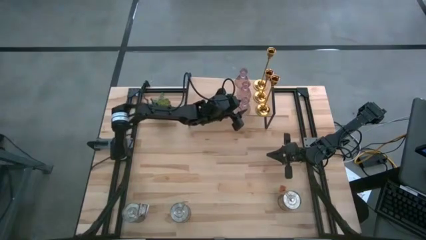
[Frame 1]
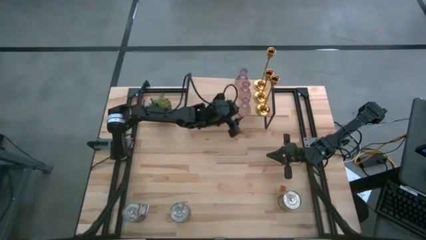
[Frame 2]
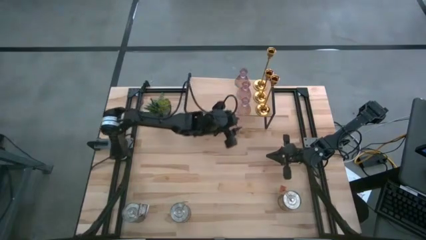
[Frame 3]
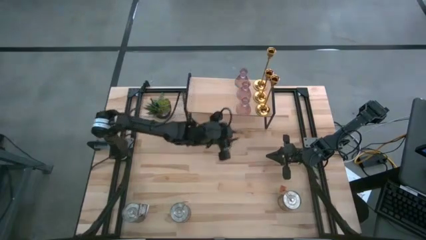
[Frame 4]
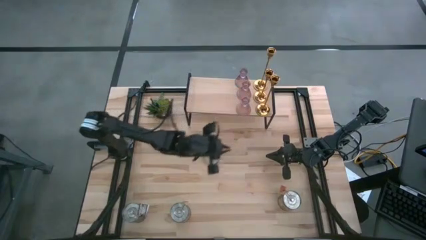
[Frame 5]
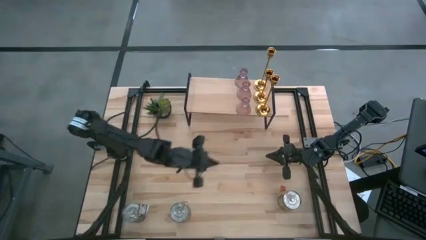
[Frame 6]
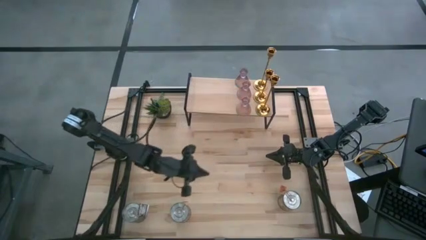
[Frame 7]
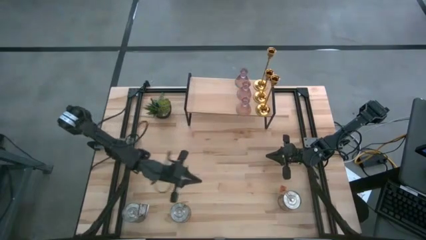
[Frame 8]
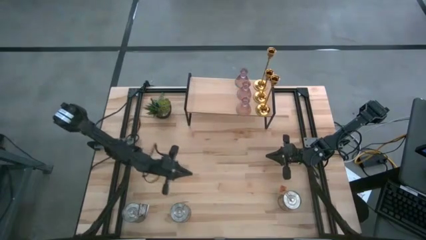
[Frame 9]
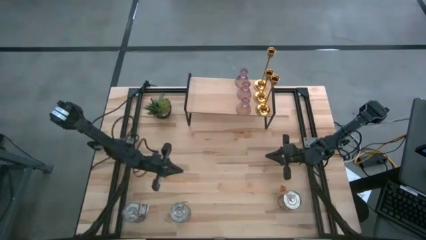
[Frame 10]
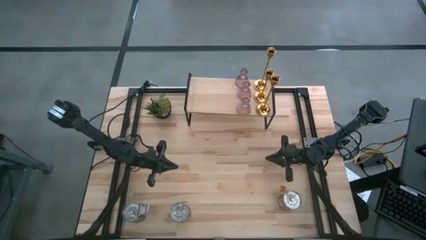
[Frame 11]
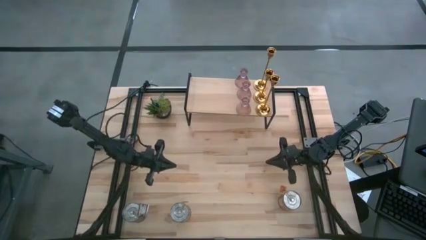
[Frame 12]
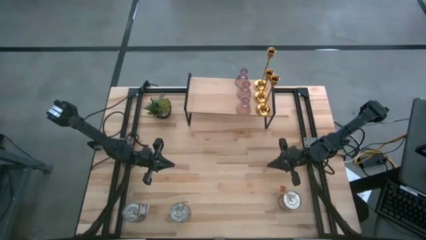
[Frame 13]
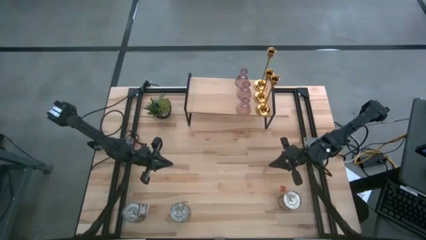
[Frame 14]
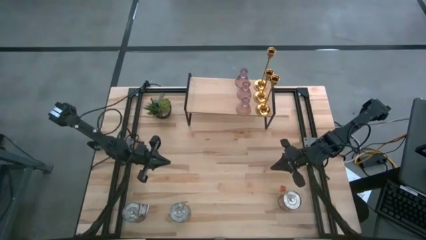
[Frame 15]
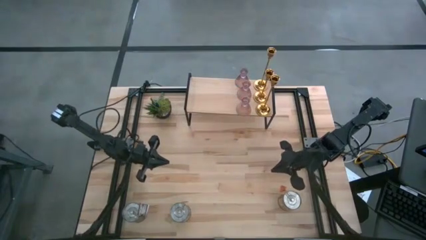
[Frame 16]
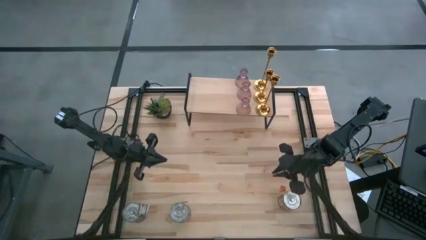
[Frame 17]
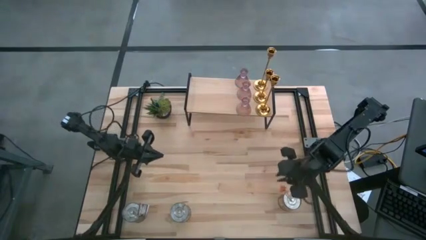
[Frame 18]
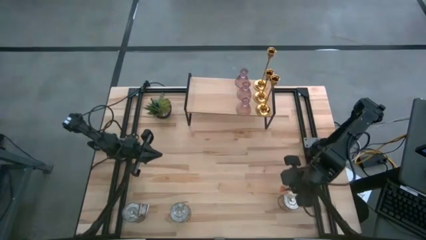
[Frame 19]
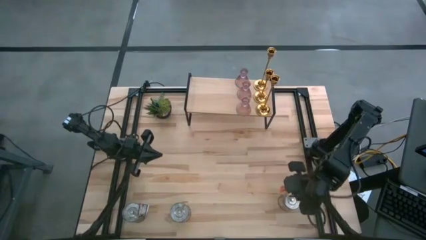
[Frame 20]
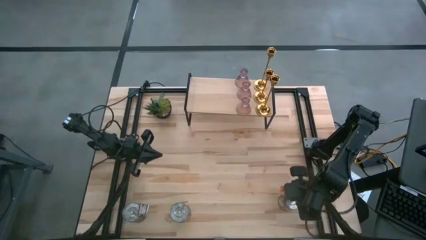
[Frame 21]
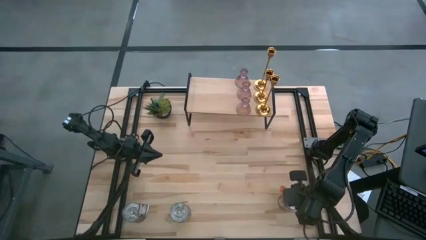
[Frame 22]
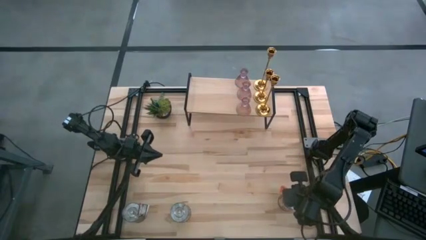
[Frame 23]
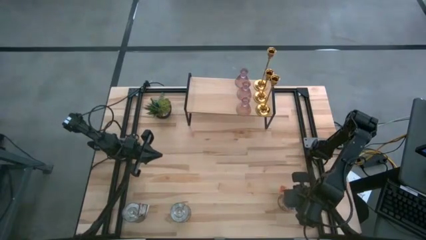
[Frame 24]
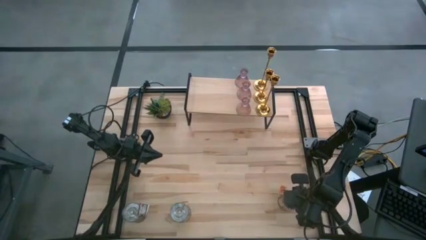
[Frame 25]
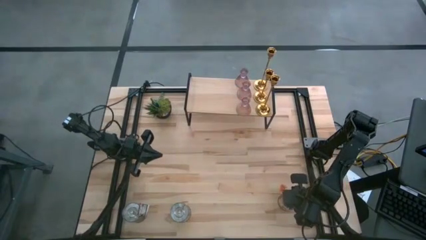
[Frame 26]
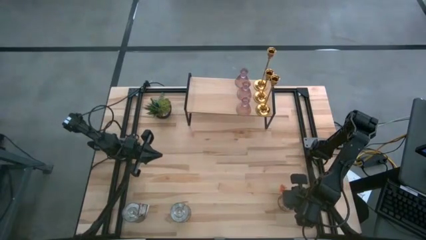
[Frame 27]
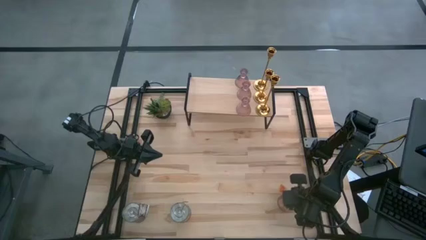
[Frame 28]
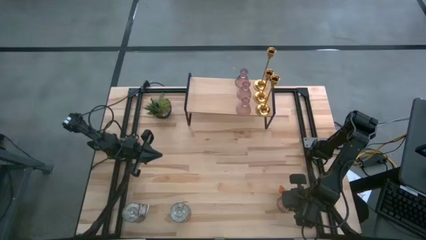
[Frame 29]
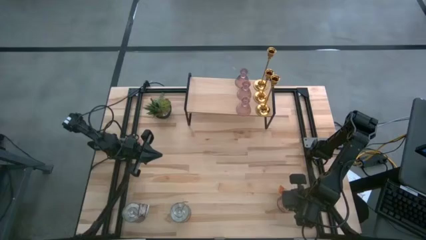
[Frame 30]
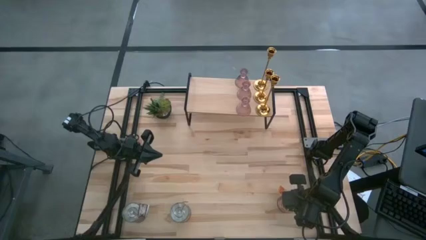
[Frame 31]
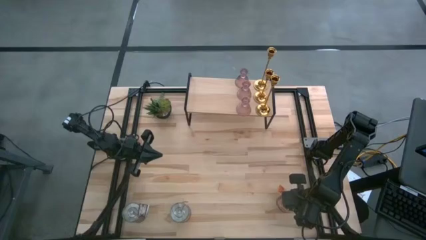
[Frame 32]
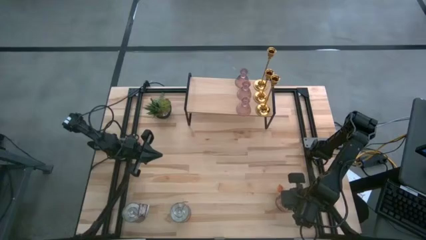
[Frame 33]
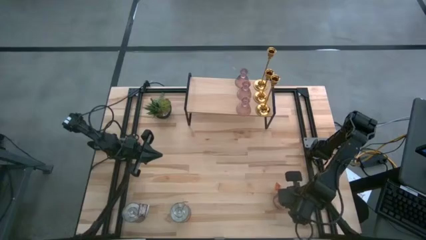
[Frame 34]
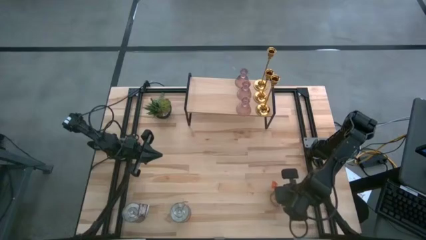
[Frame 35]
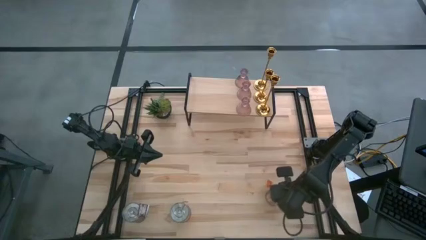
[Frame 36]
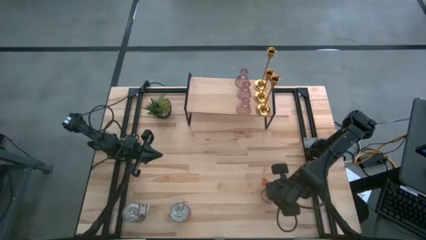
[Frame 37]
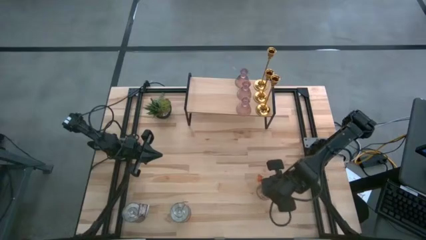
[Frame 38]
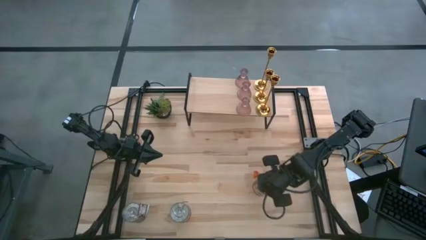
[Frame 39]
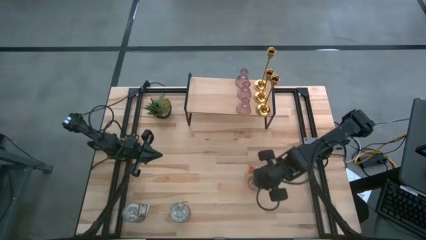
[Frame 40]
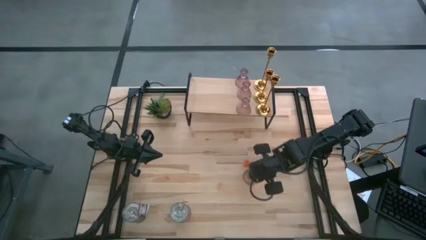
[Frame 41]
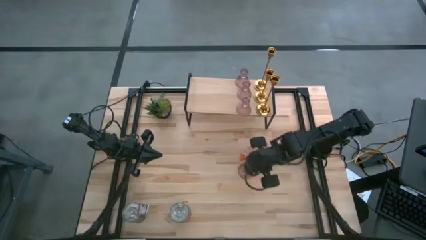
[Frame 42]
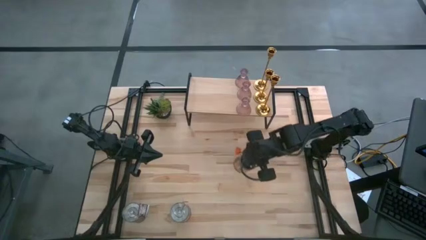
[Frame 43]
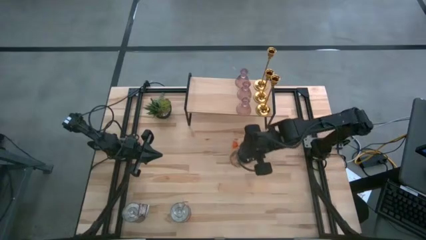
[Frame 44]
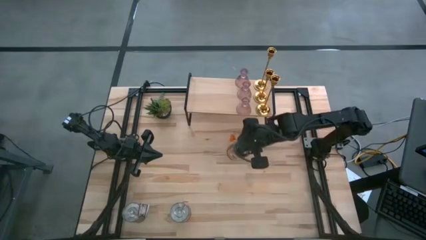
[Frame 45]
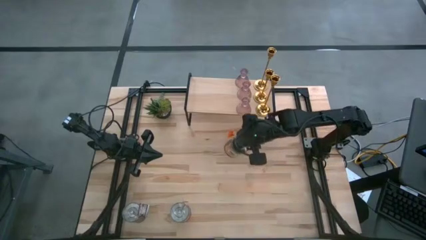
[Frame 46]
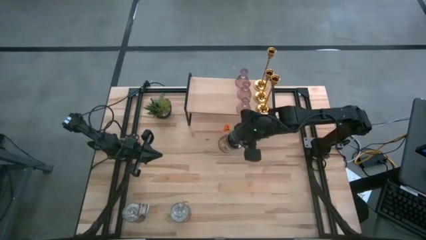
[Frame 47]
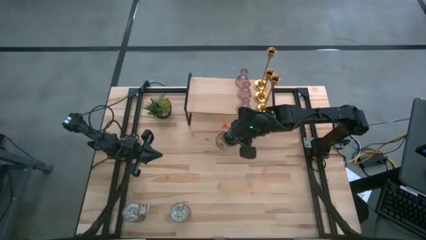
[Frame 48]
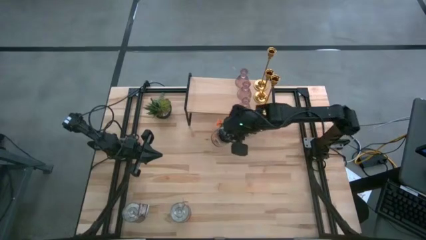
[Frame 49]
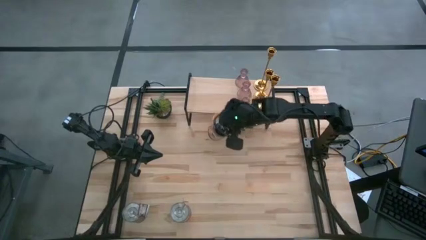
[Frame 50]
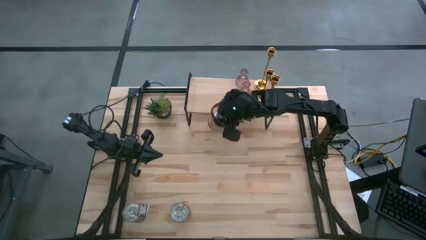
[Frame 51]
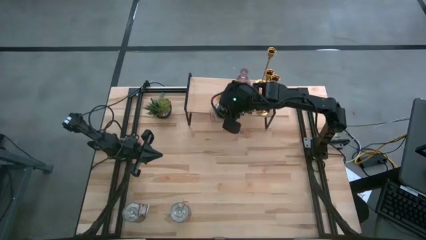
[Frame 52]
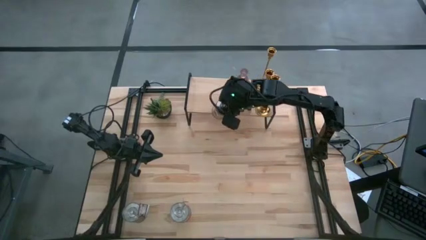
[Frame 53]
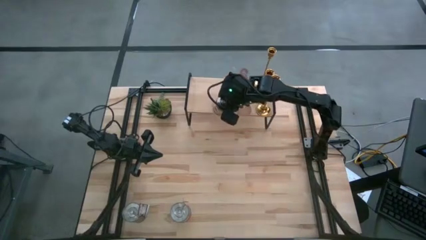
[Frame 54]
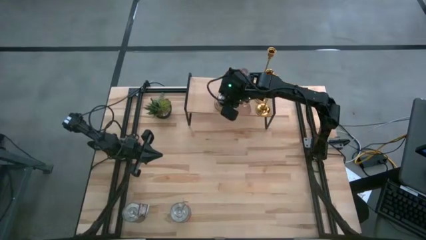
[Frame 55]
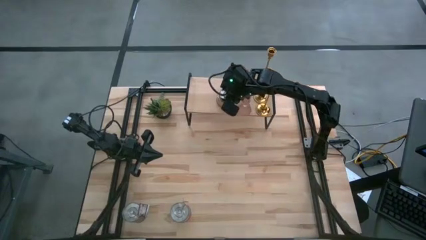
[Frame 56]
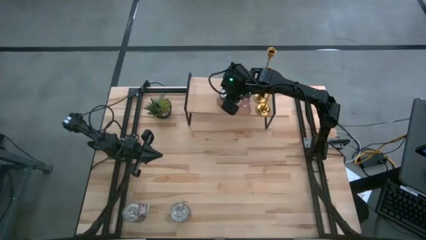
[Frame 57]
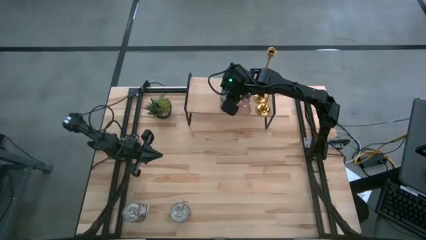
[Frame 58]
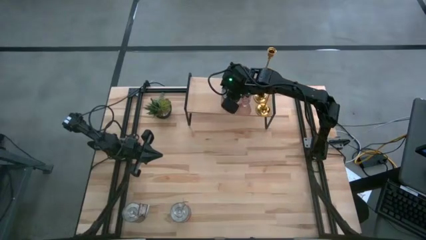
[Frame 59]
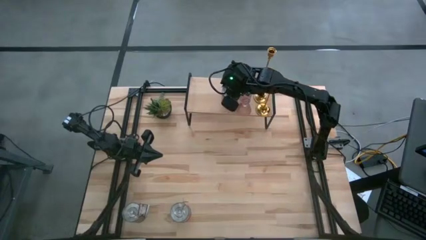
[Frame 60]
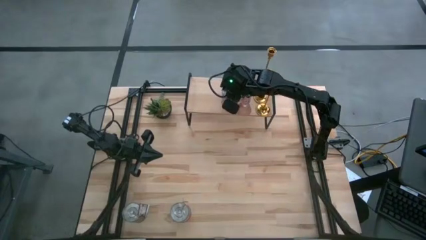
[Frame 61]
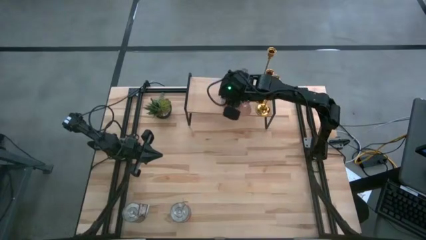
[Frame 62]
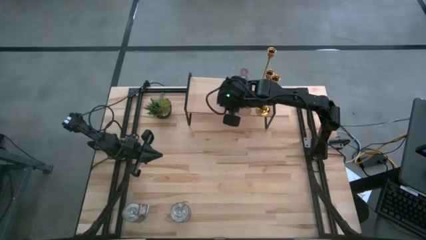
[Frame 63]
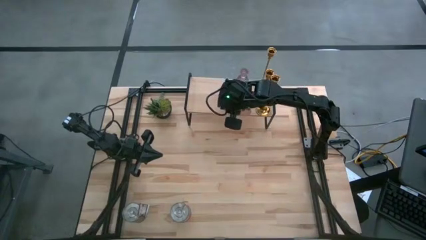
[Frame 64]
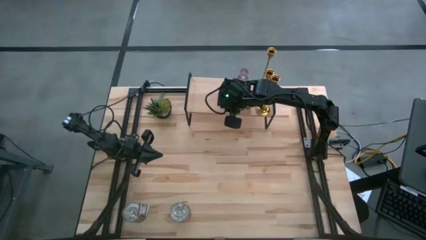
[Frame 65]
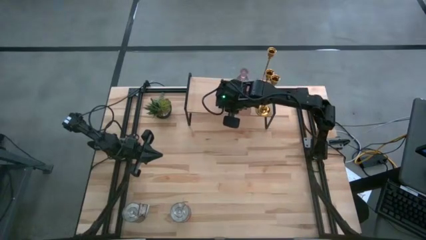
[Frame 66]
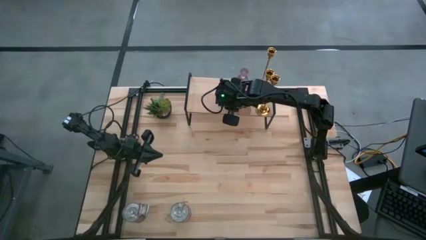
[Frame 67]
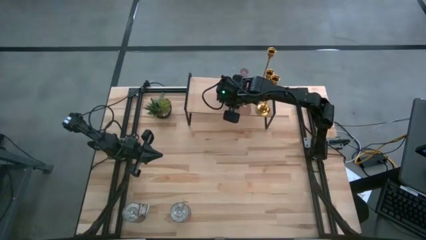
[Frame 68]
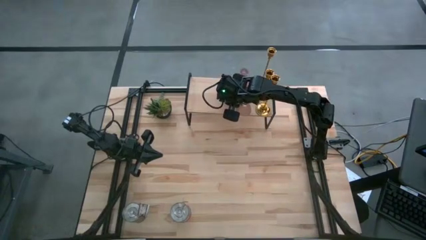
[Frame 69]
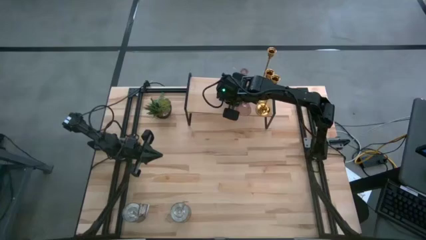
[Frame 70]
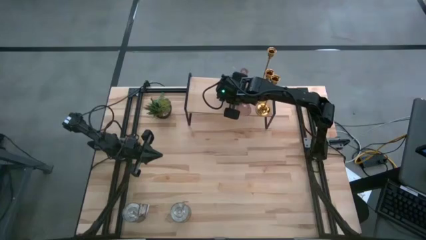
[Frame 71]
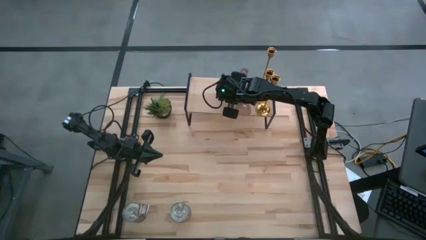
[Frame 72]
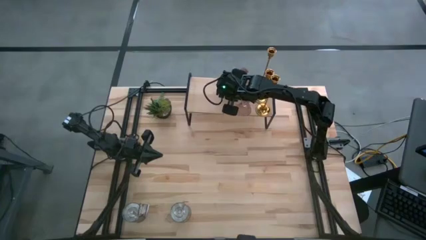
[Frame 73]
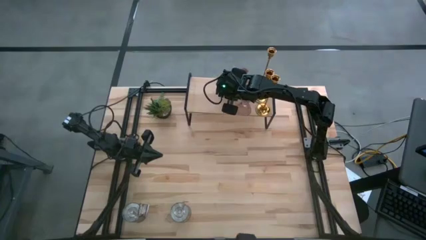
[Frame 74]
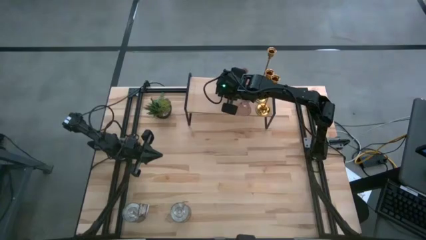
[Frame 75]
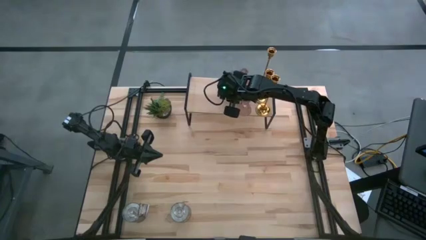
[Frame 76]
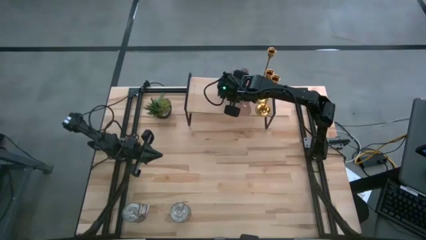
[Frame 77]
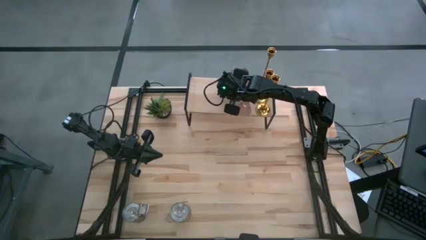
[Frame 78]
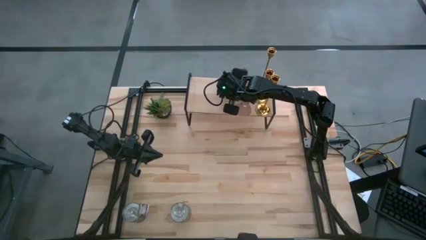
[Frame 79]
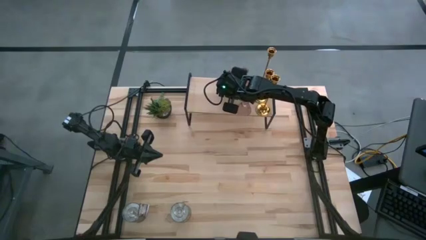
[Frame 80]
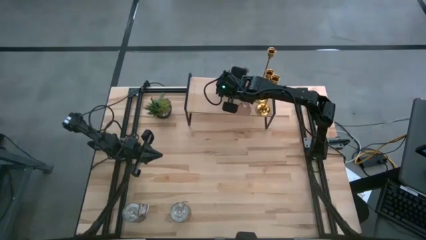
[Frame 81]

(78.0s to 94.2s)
Task: Pick & Place candle stick holders
Put the right silver scented candle on the shelf
